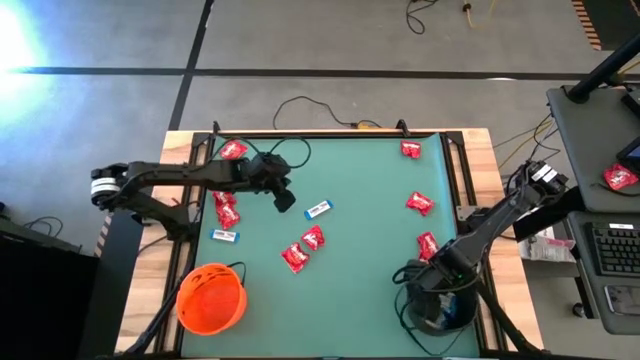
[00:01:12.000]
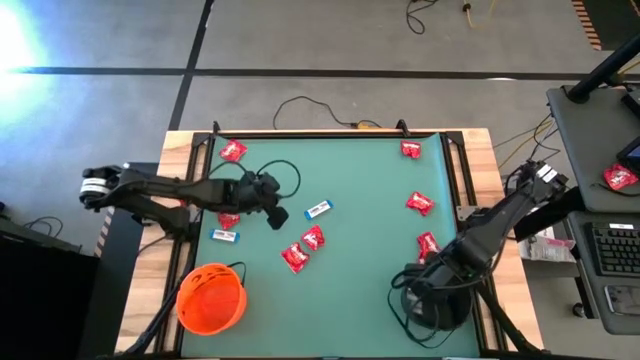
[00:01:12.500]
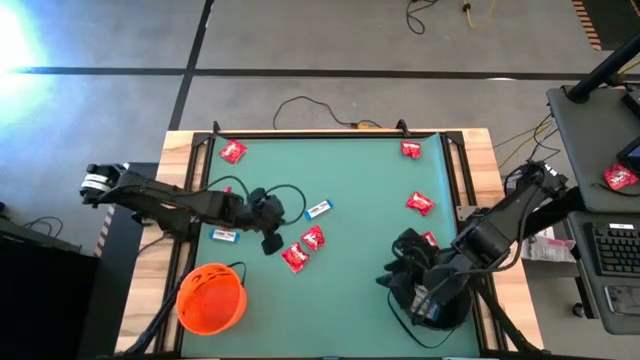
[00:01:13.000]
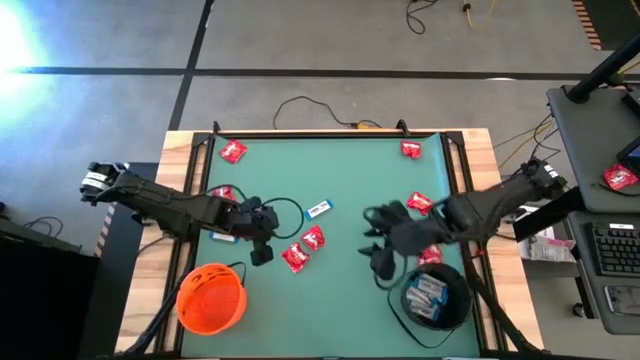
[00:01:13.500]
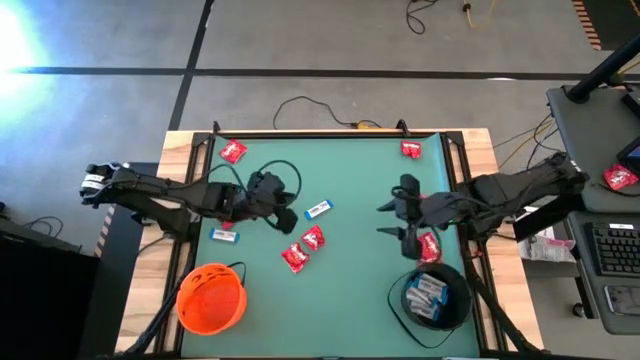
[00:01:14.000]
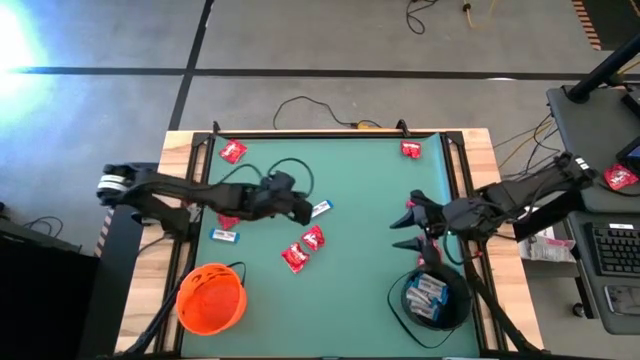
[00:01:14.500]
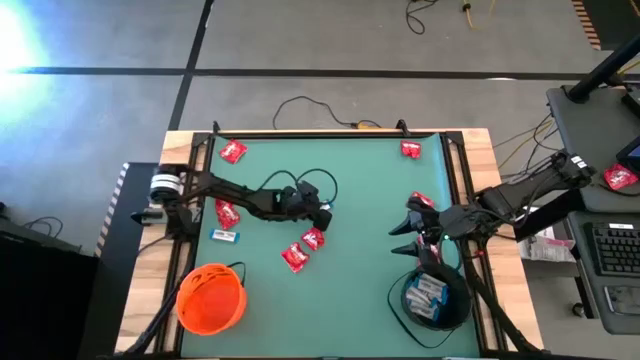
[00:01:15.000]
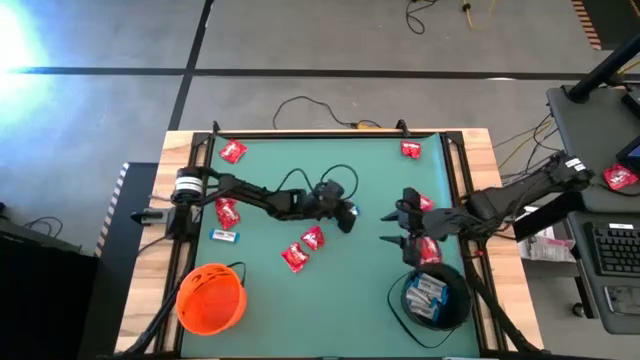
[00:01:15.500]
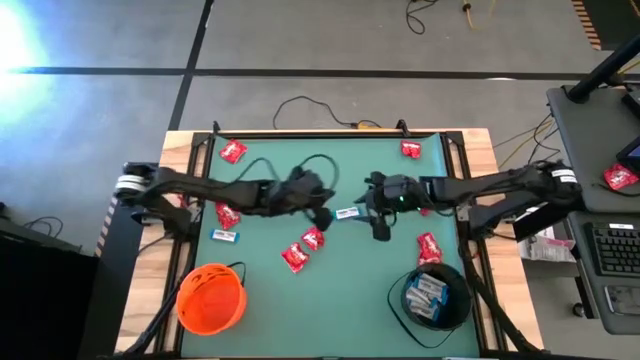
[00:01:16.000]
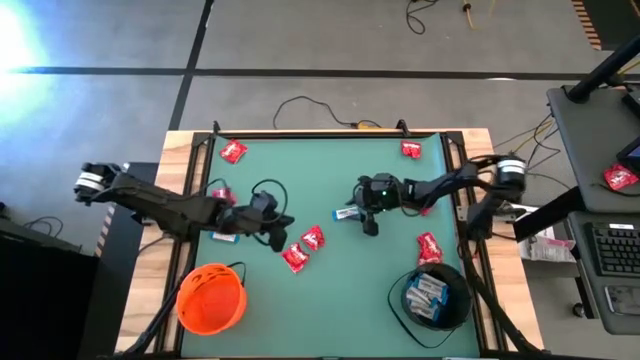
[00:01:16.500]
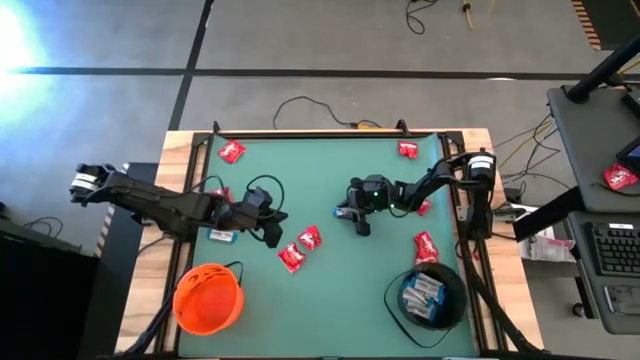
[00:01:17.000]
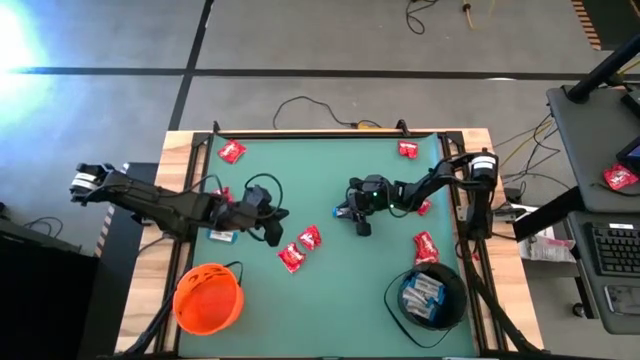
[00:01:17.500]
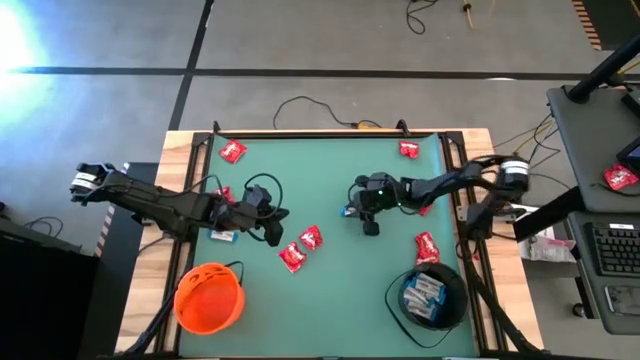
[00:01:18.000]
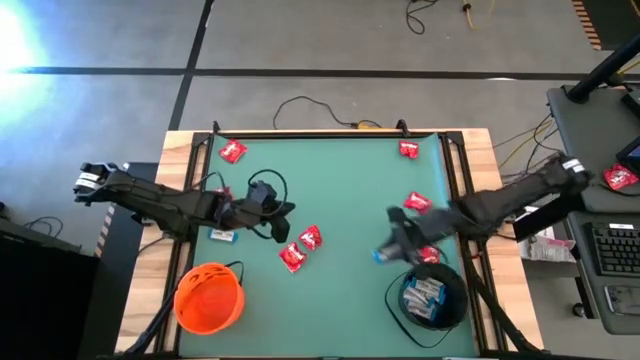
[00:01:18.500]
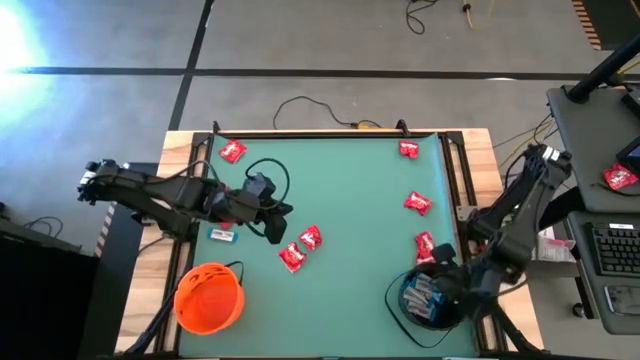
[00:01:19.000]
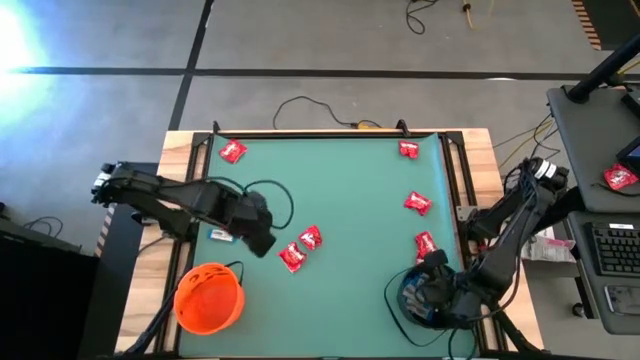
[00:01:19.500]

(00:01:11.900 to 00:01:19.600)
Task: Sort candy by brand, put in halloween buckets
Put the white chocolate into the black bucket

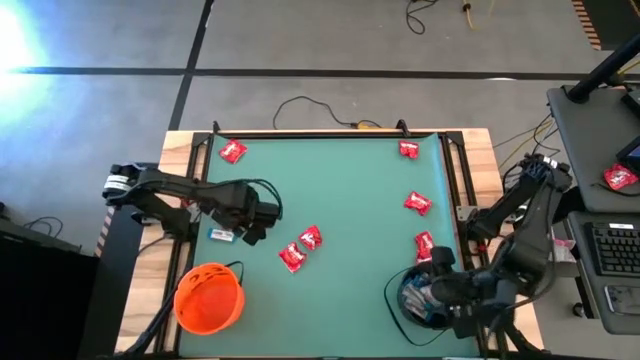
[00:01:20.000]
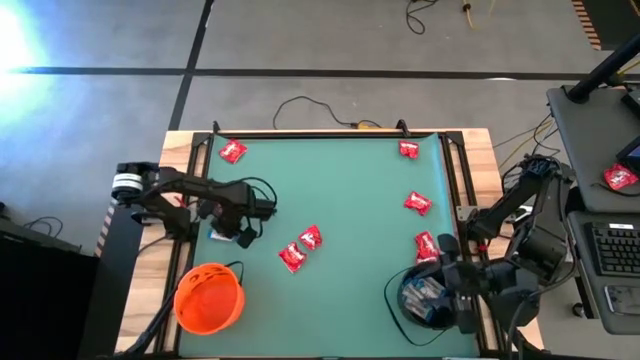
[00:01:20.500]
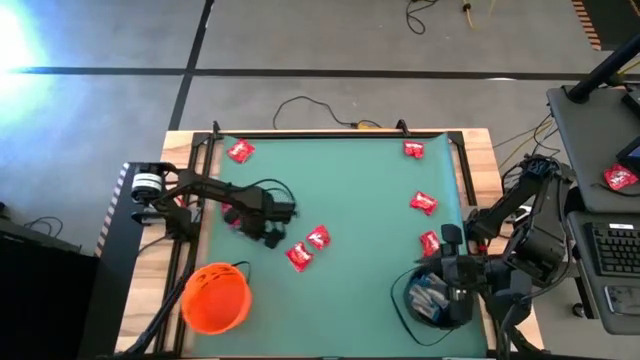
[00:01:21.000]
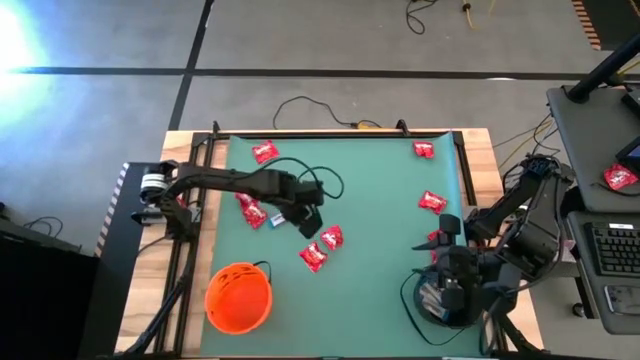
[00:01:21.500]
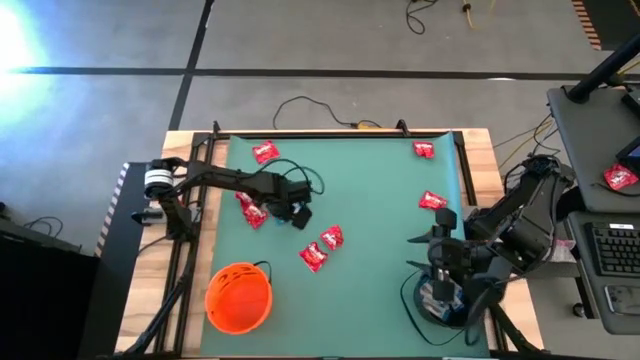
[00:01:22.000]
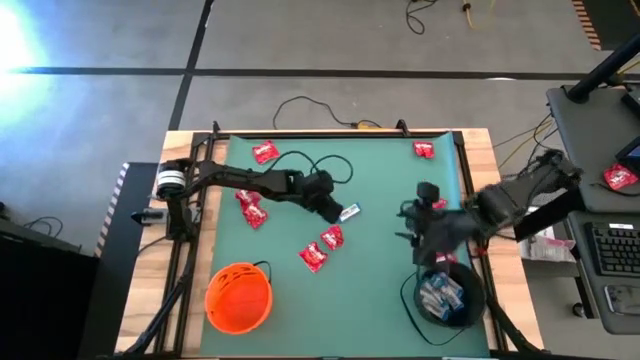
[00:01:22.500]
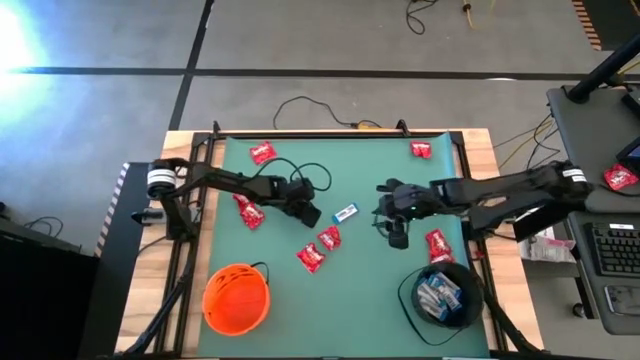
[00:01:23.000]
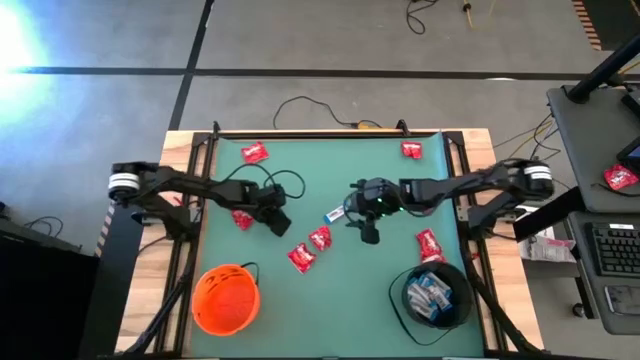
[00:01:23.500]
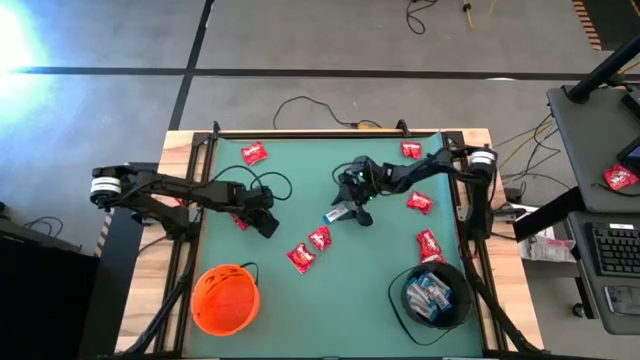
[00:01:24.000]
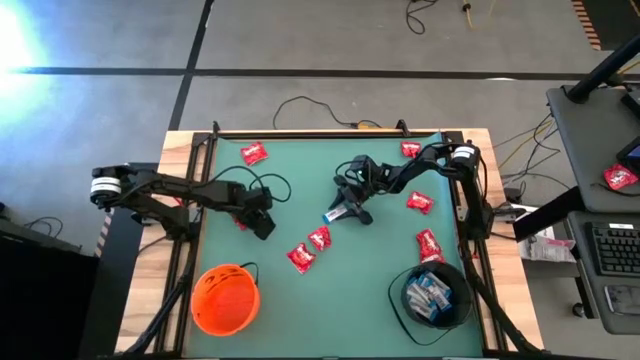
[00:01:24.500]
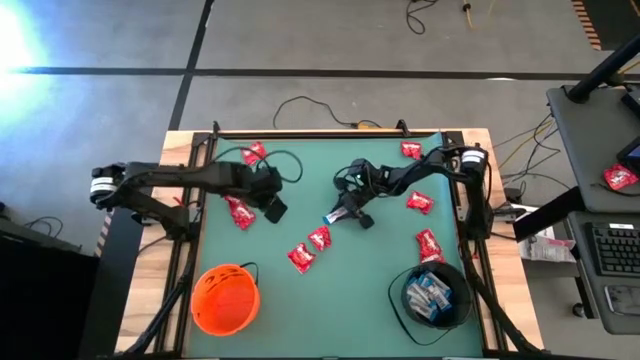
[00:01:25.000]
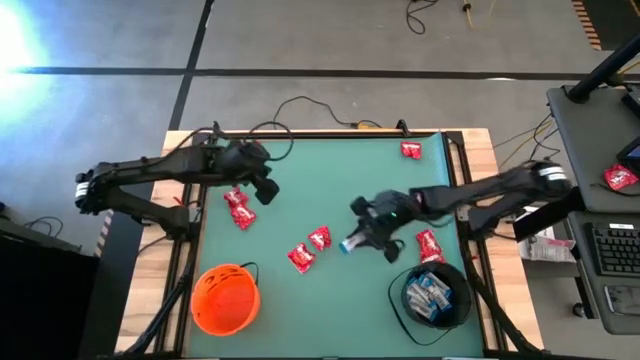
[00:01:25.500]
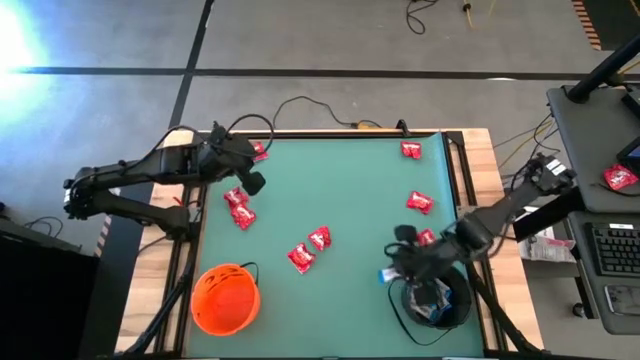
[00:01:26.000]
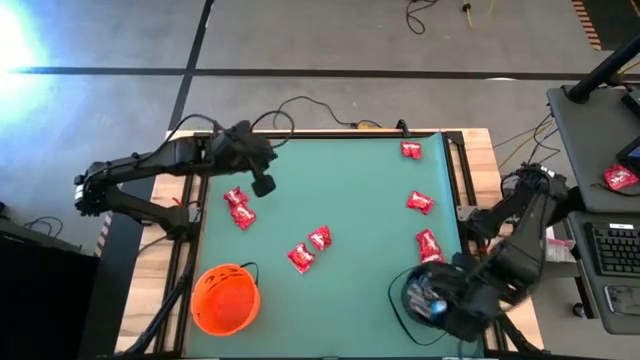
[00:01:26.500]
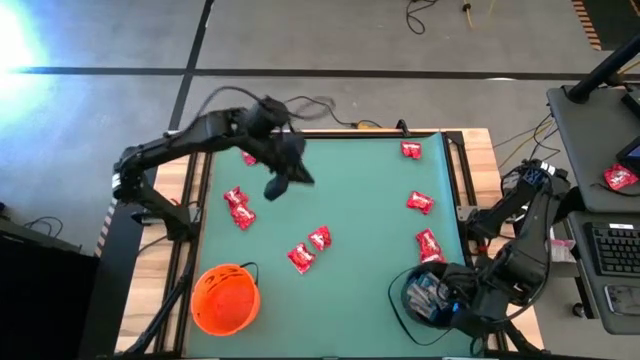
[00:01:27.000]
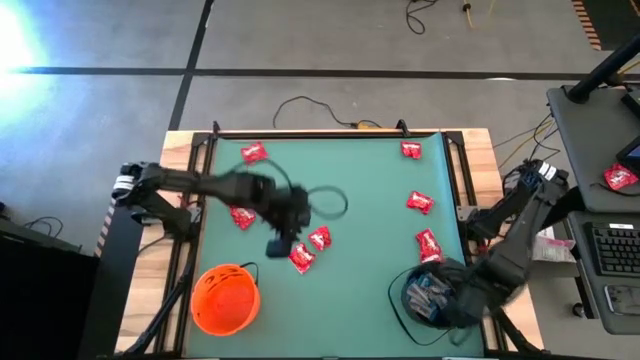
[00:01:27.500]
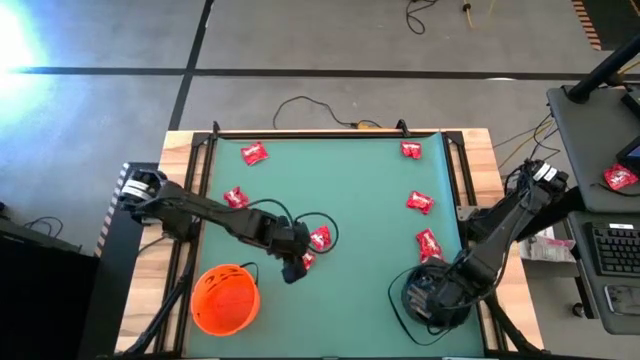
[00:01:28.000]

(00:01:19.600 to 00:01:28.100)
Put the white chocolate into the black bucket

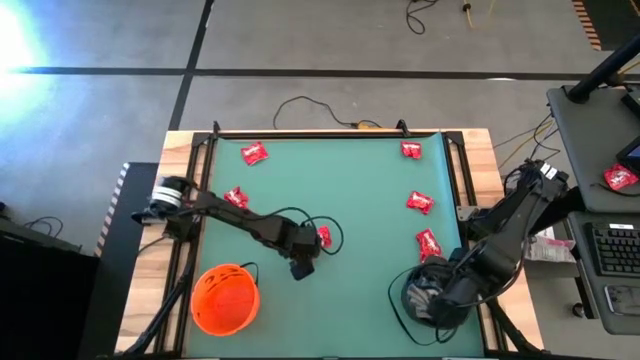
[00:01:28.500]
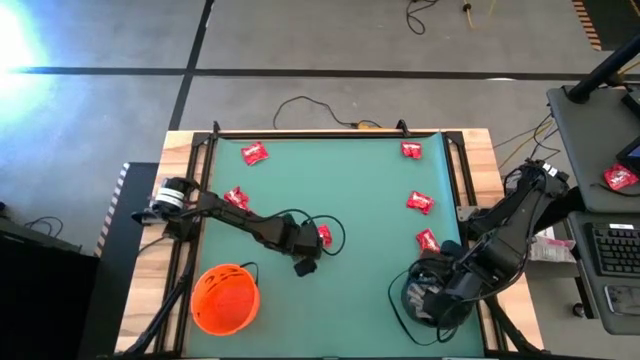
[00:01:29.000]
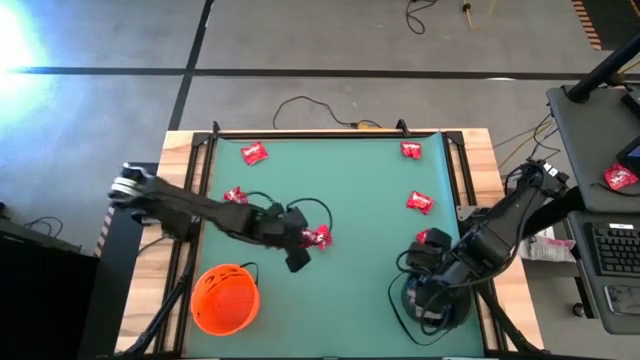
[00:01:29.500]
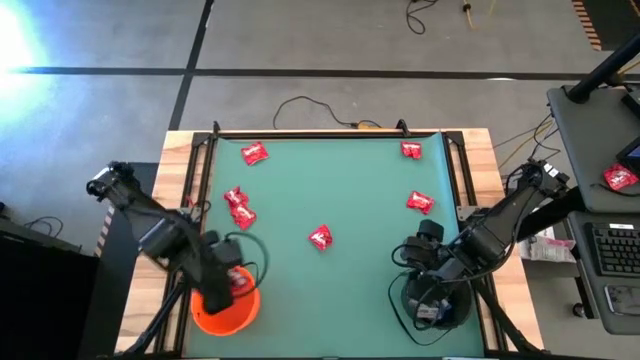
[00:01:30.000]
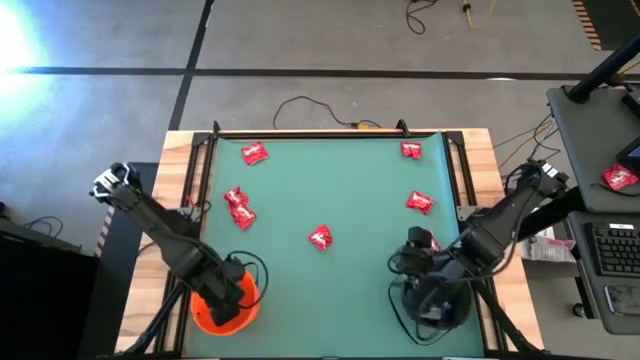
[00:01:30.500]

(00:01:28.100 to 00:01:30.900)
Put the red chocolate candy into the orange bucket

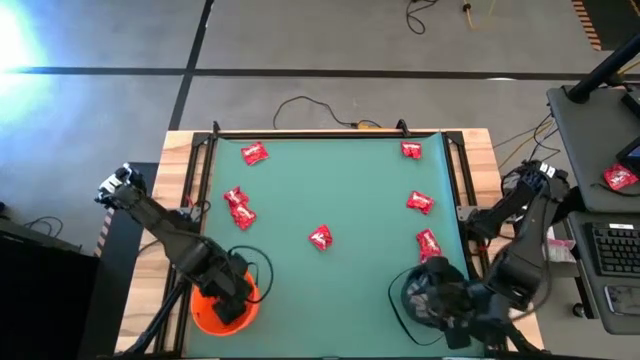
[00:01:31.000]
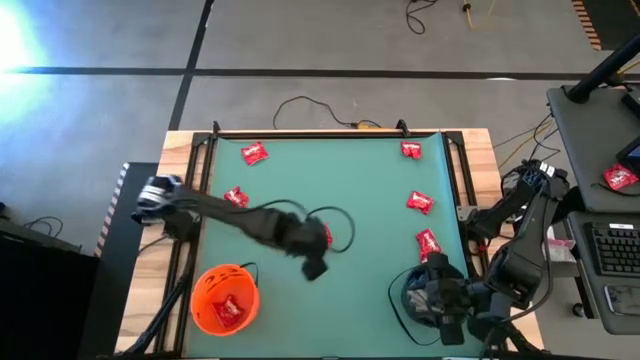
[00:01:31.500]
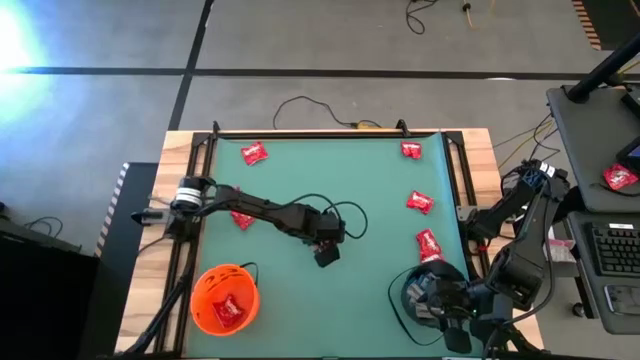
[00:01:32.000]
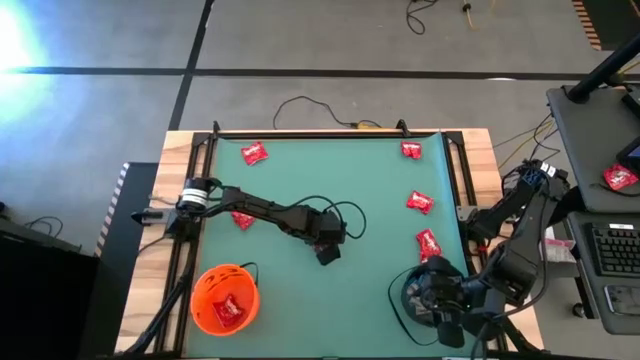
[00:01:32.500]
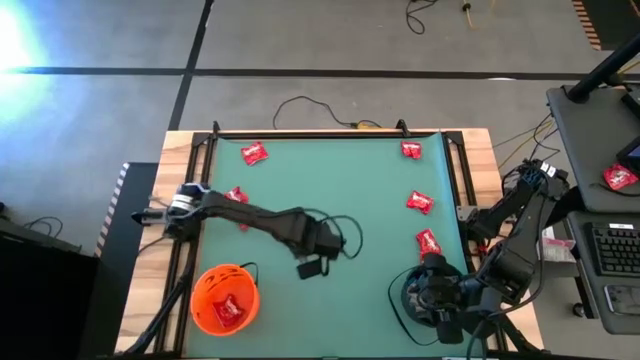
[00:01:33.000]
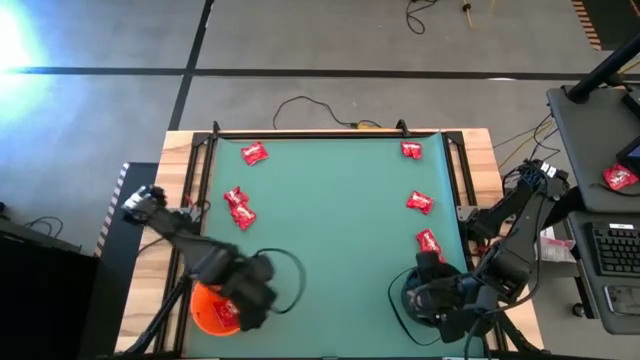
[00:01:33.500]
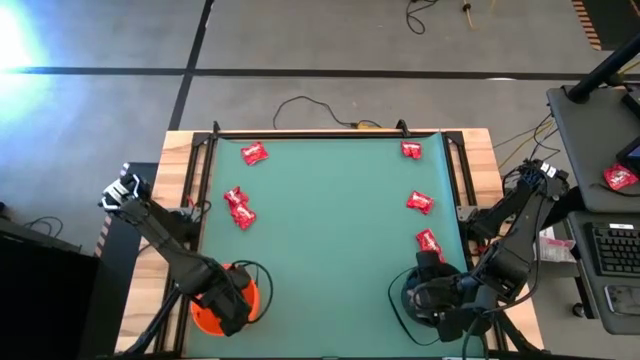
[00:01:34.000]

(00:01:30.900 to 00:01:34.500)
Put the red chocolate candy into the orange bucket
